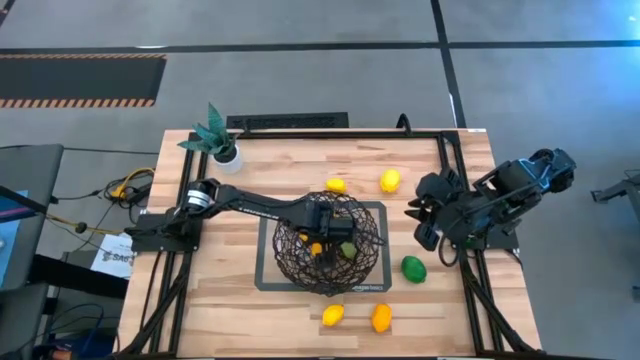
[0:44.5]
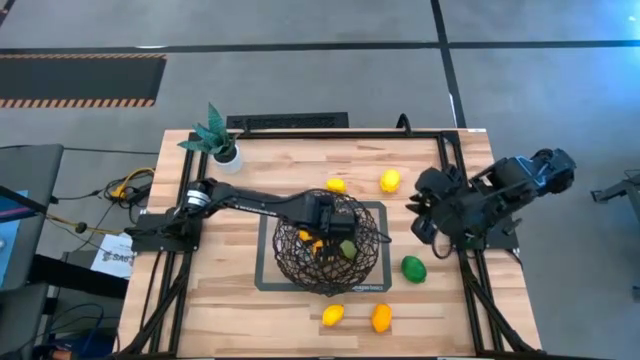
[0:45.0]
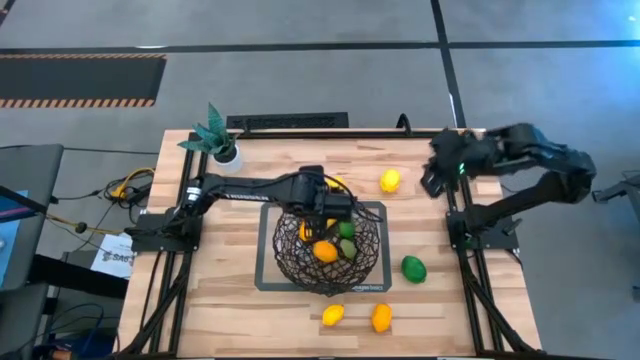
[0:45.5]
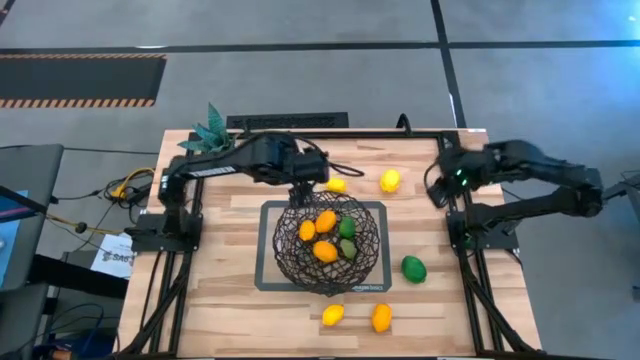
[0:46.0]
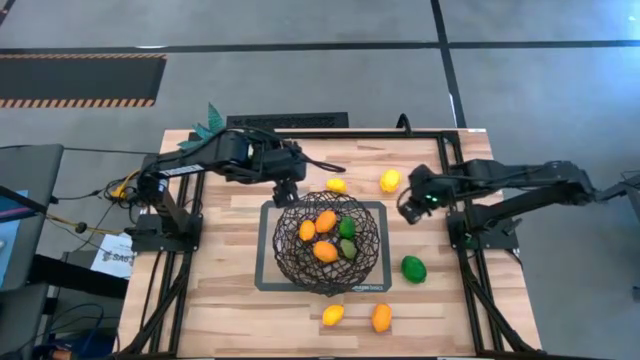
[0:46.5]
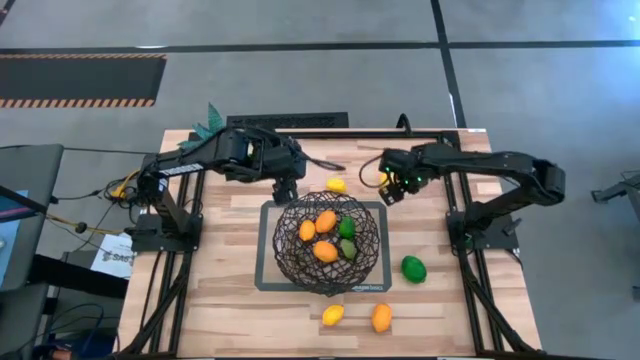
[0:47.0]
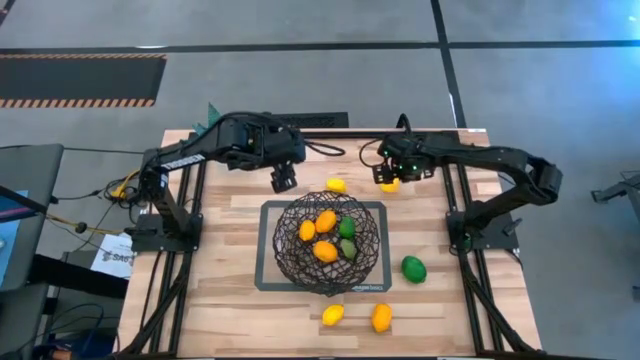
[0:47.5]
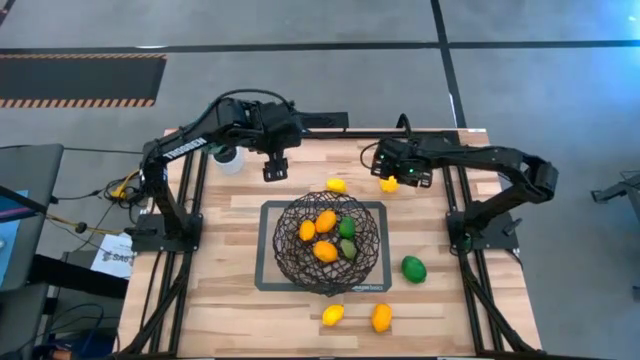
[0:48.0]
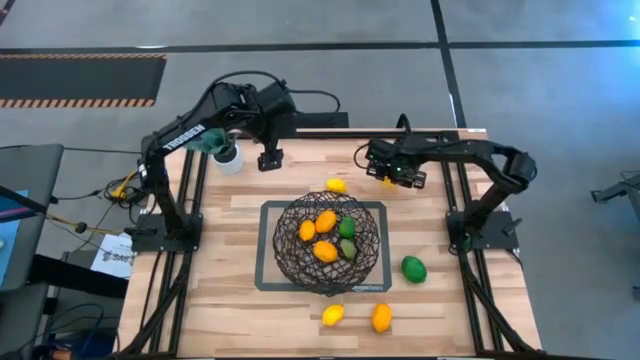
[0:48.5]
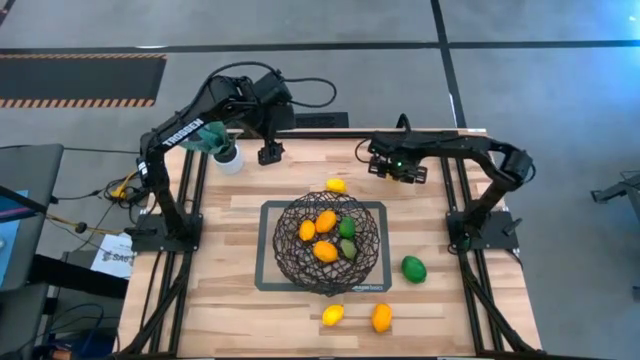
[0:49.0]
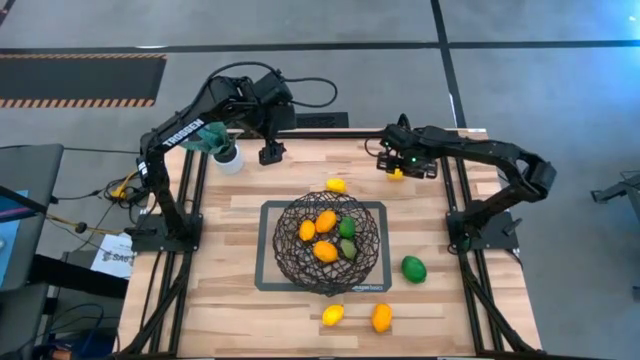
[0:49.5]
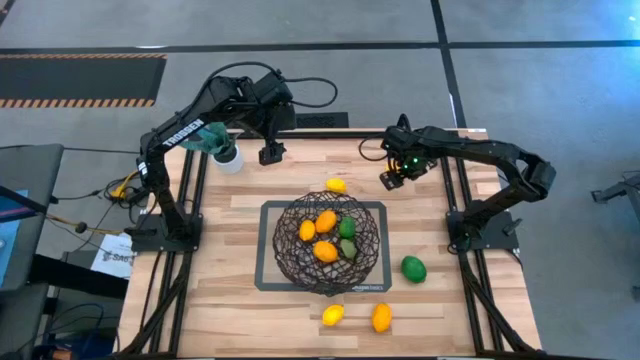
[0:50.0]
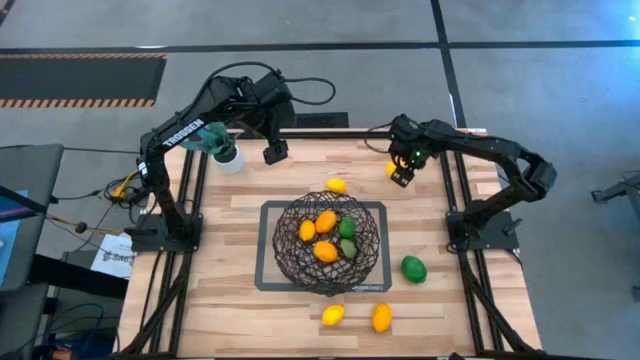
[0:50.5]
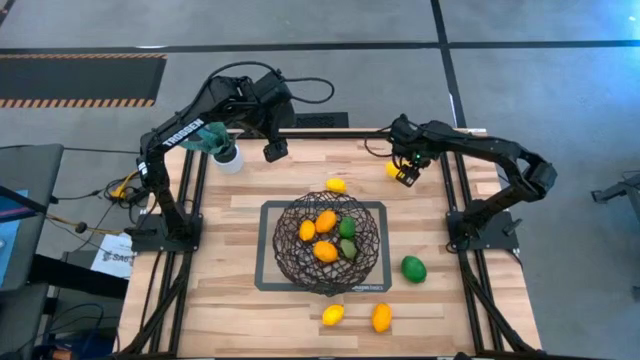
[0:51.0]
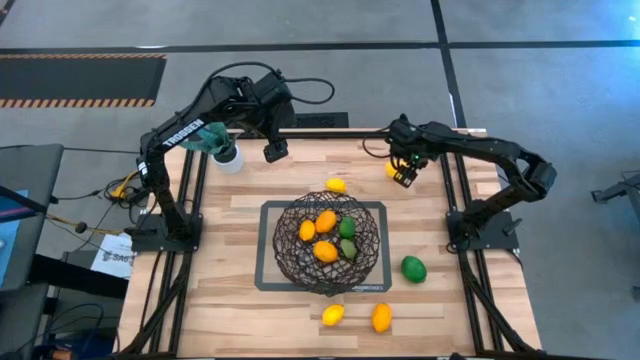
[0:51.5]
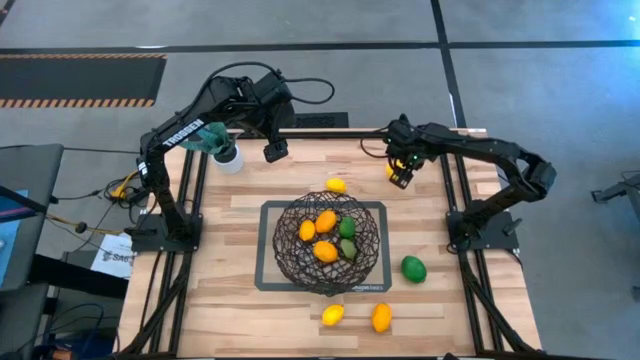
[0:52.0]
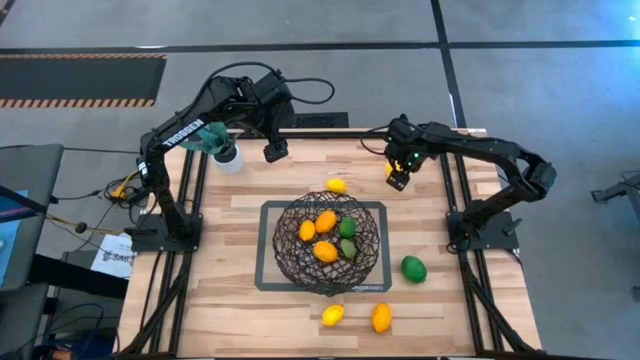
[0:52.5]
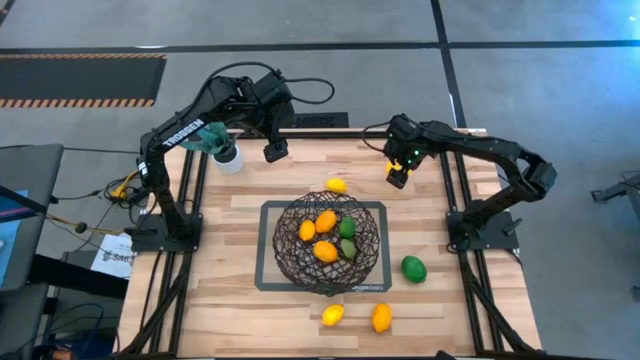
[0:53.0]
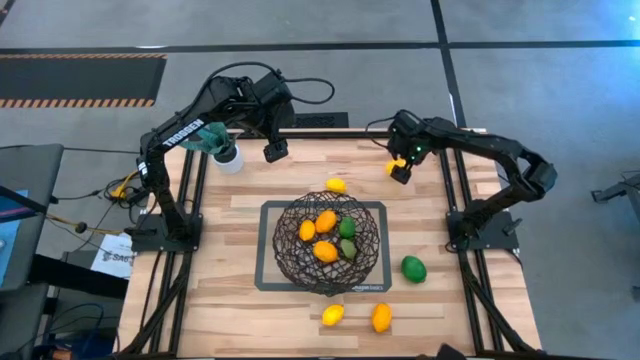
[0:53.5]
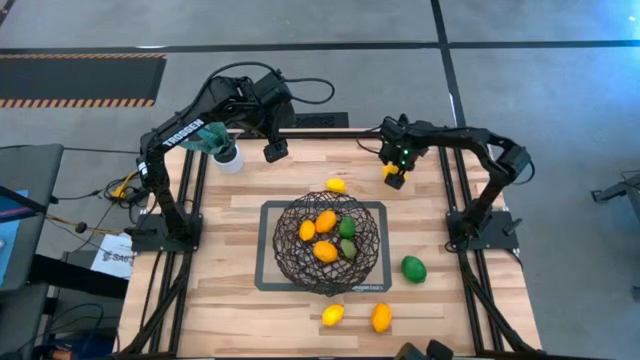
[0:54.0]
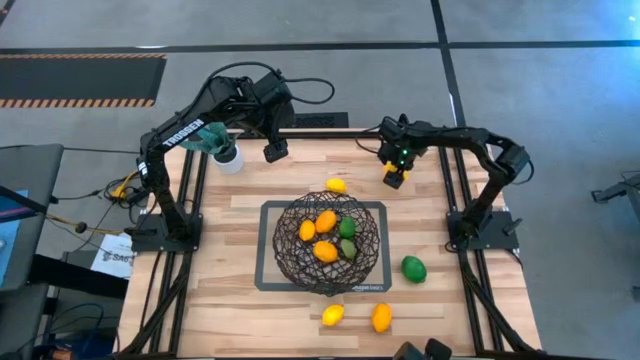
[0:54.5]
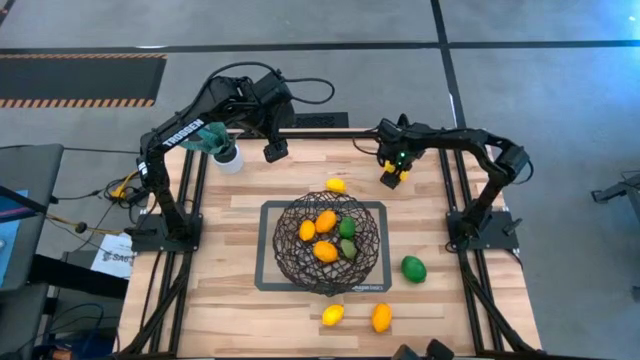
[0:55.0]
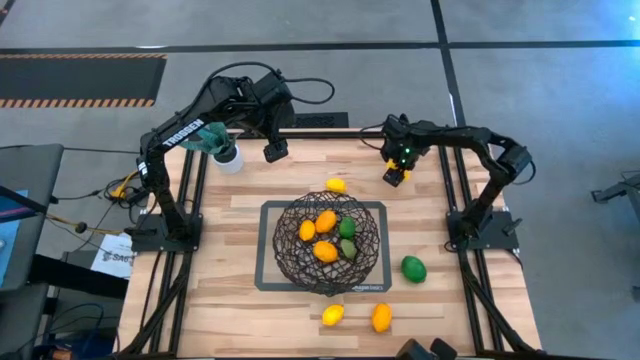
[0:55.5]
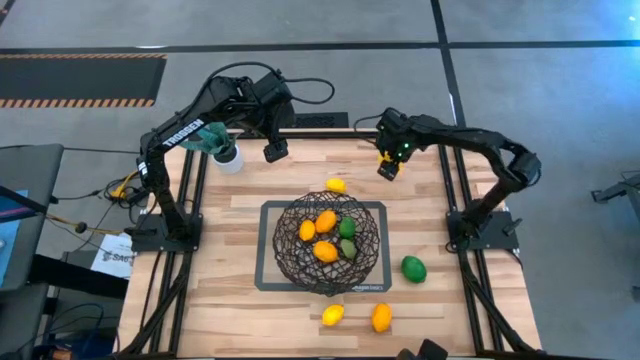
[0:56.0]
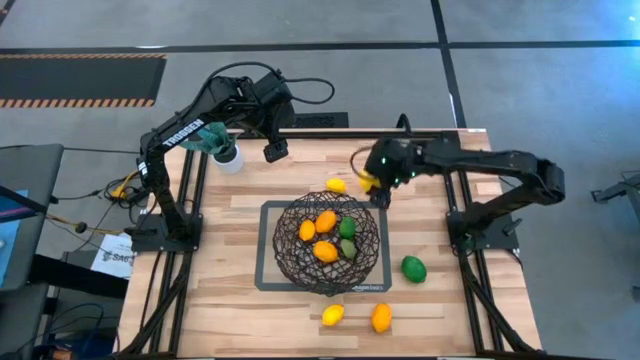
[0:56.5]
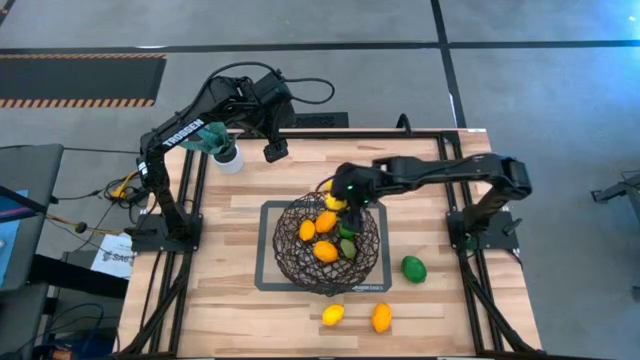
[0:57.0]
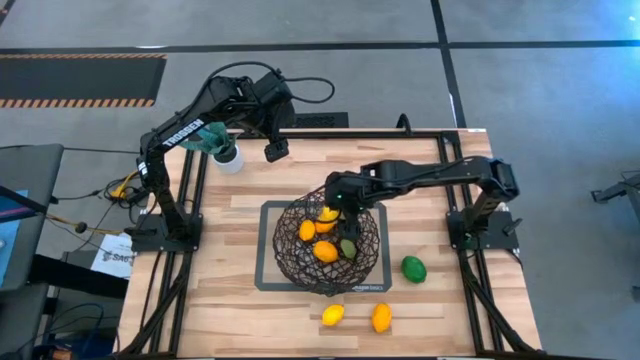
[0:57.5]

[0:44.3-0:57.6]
Task: Build produce basket
Put the lemon into the basket

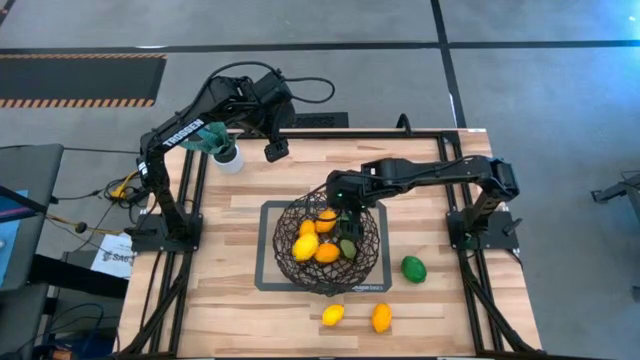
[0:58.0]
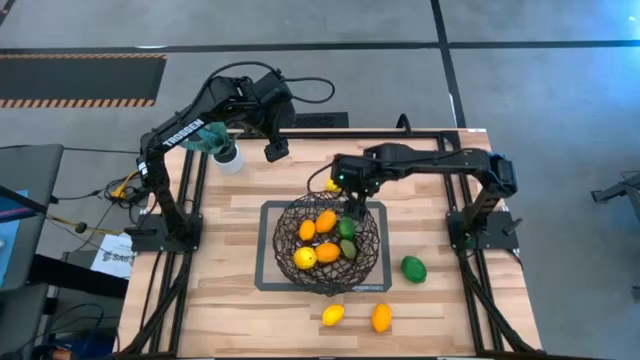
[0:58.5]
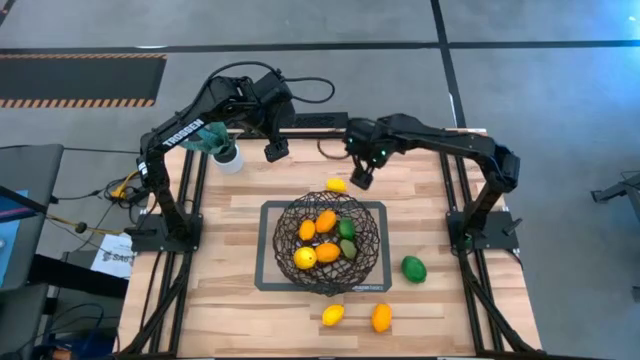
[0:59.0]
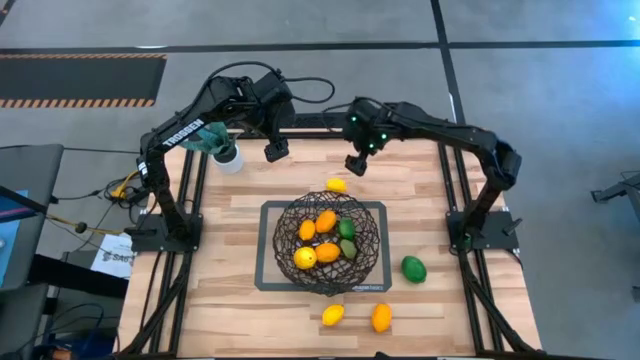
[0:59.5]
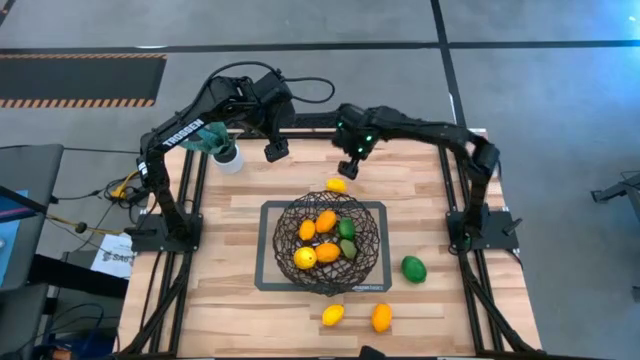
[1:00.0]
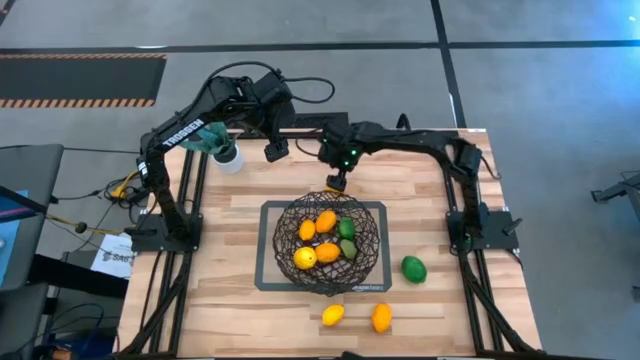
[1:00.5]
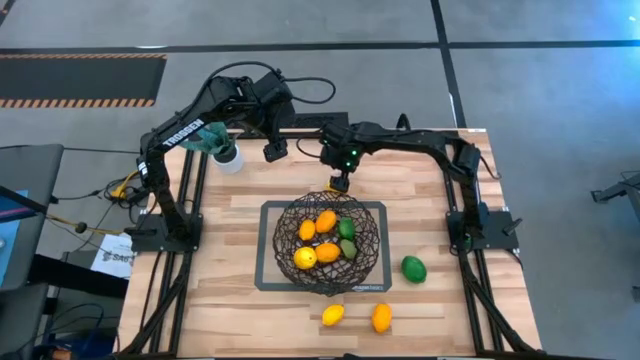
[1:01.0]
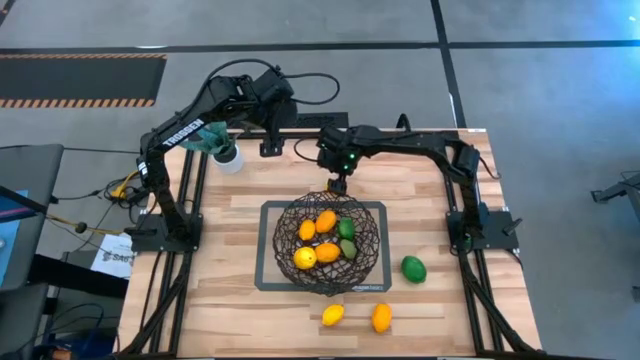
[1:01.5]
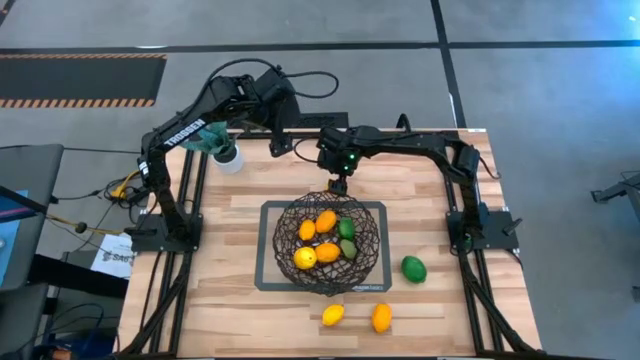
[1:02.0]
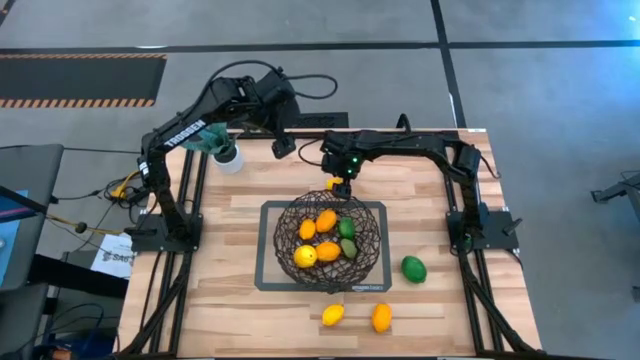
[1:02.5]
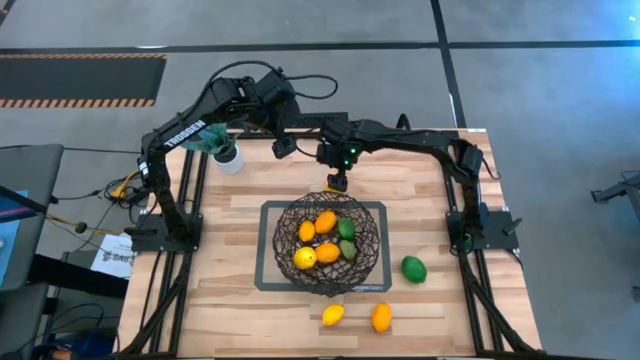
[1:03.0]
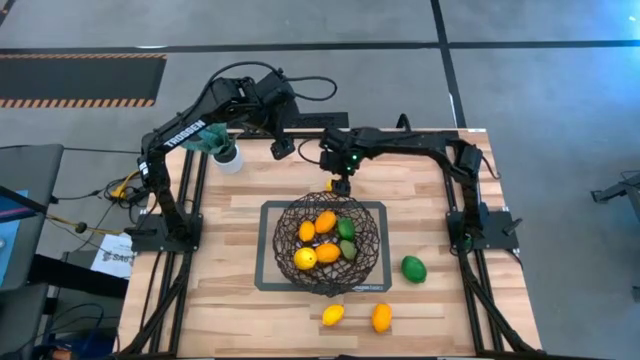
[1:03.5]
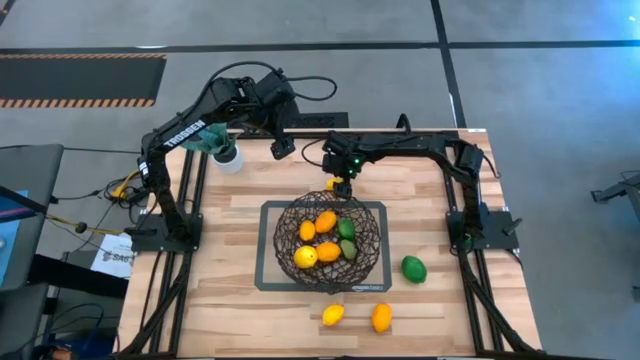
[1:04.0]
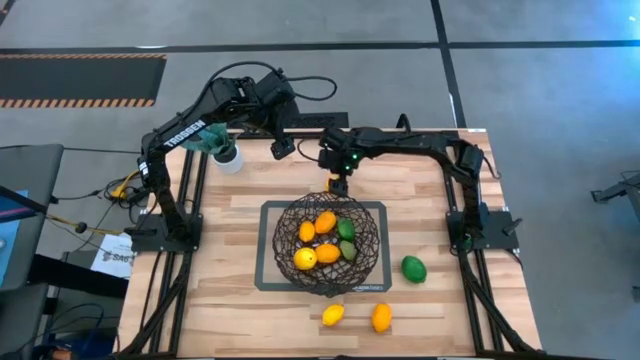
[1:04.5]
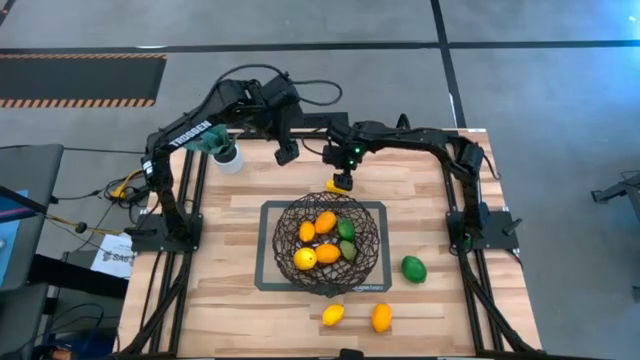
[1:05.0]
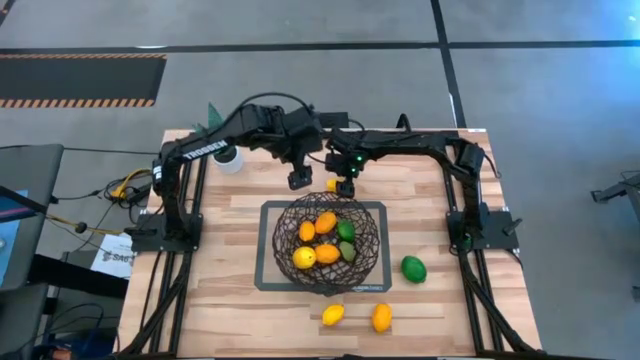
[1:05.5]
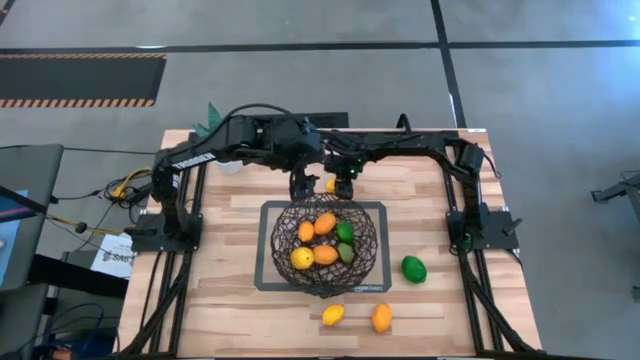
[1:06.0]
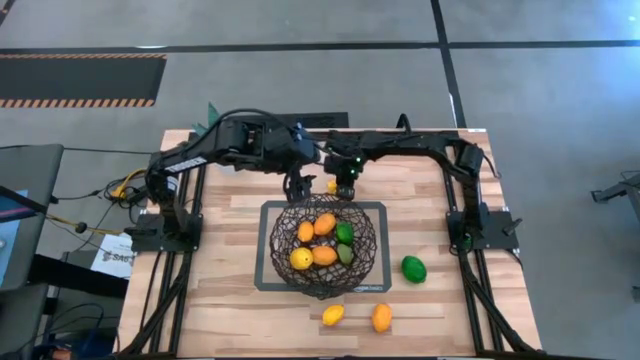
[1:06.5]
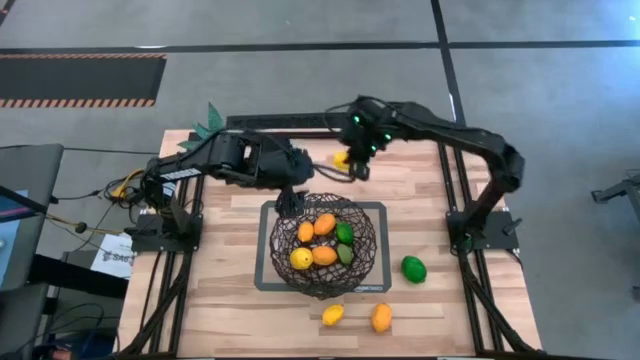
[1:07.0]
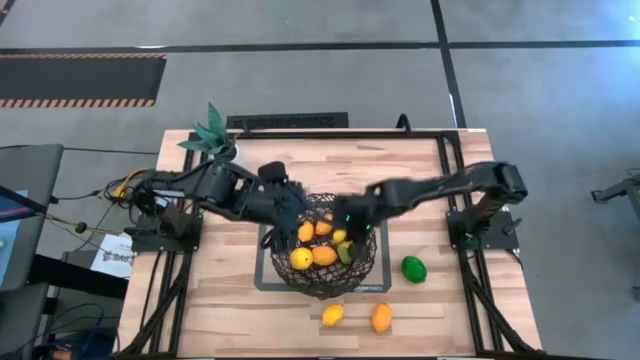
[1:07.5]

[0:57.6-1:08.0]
Put the top lemon into the basket
